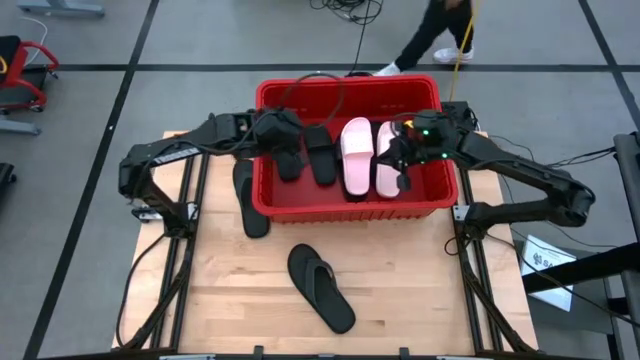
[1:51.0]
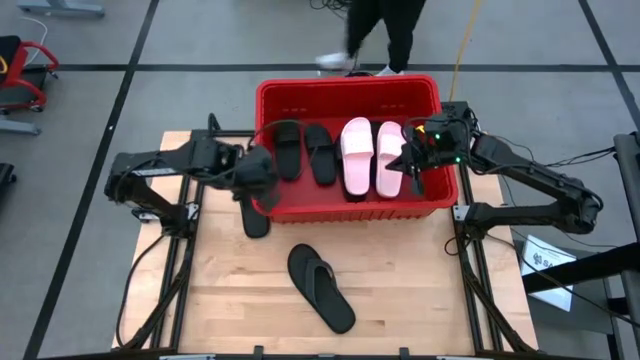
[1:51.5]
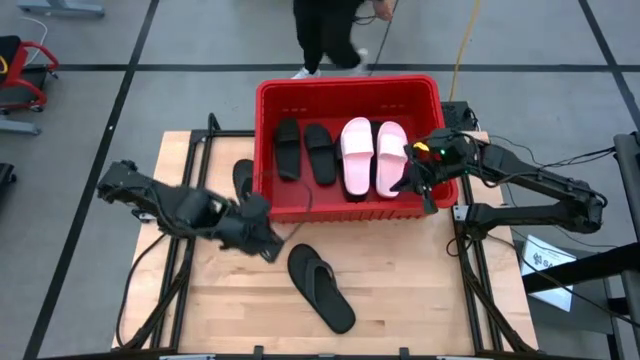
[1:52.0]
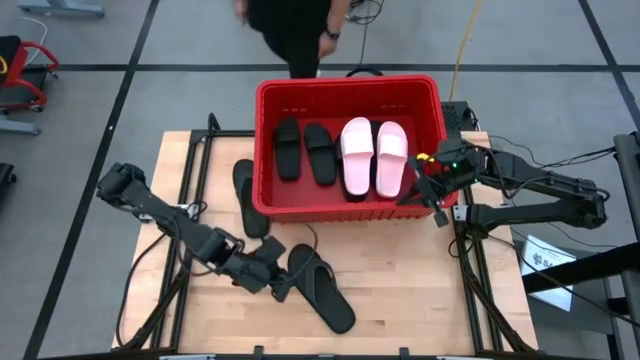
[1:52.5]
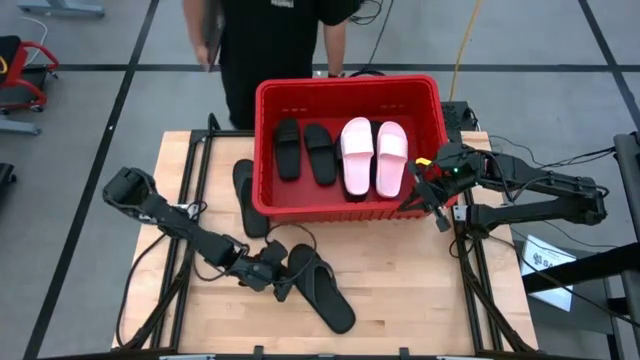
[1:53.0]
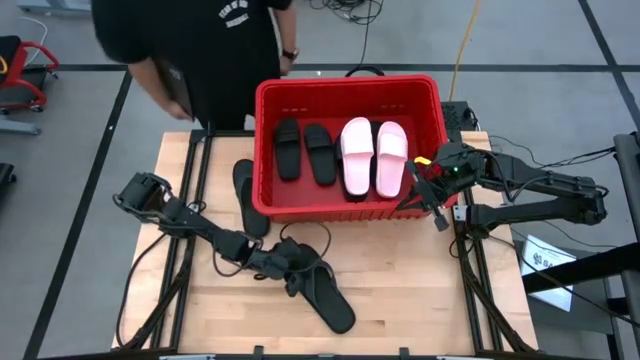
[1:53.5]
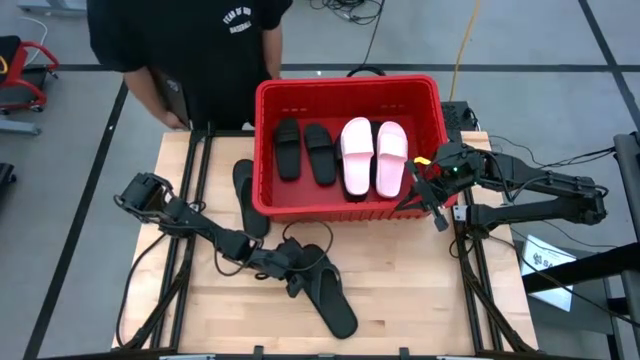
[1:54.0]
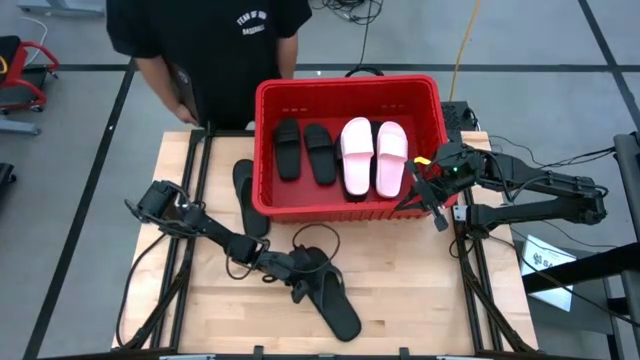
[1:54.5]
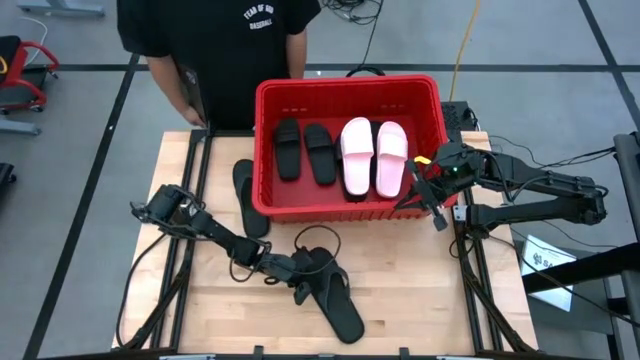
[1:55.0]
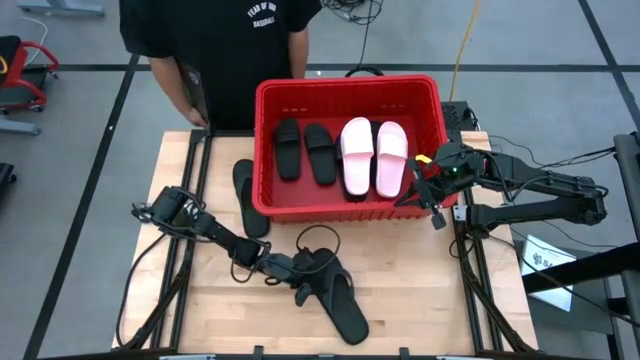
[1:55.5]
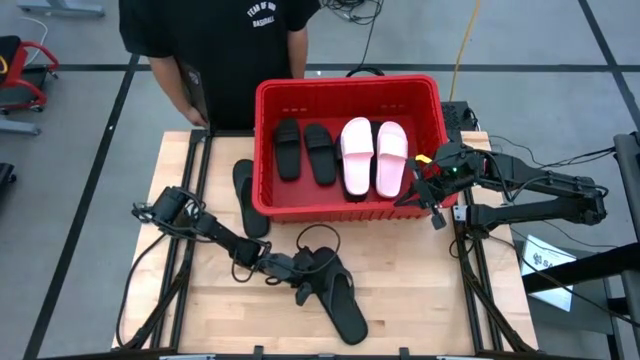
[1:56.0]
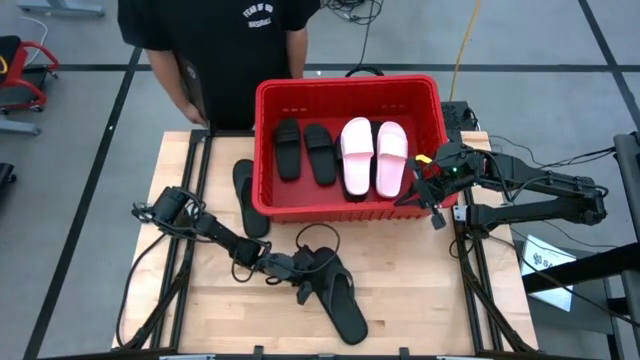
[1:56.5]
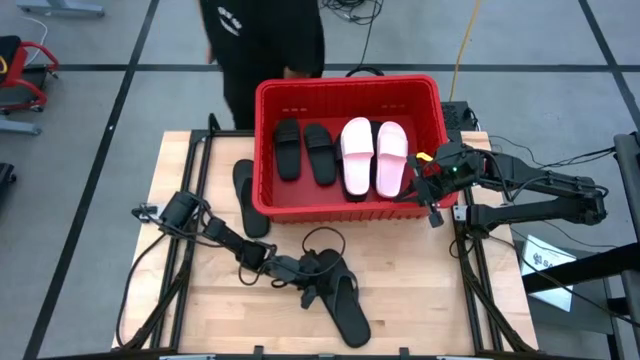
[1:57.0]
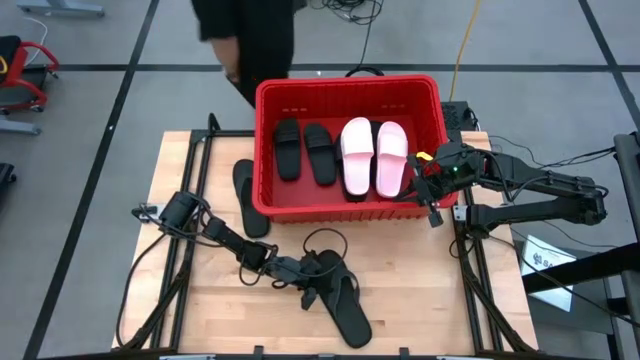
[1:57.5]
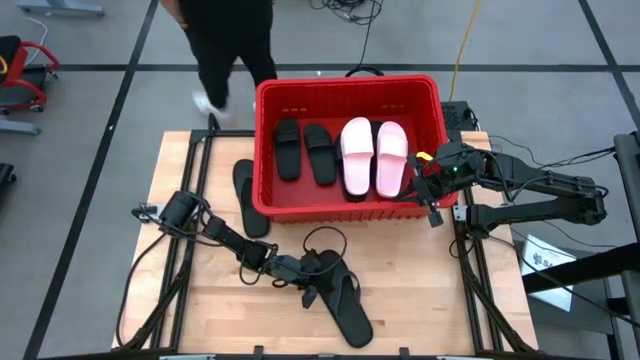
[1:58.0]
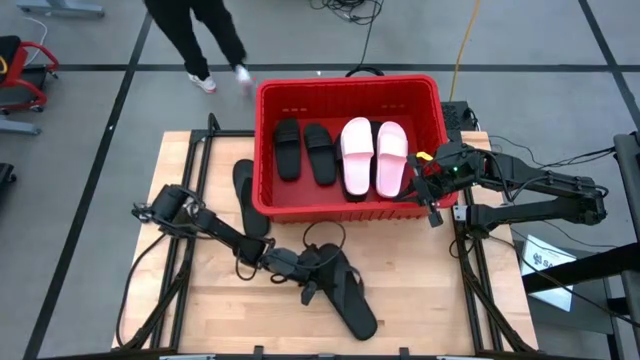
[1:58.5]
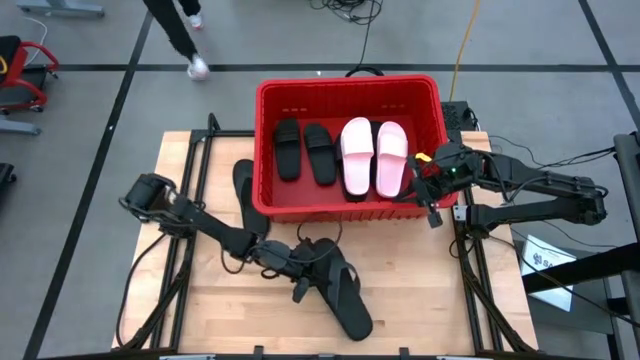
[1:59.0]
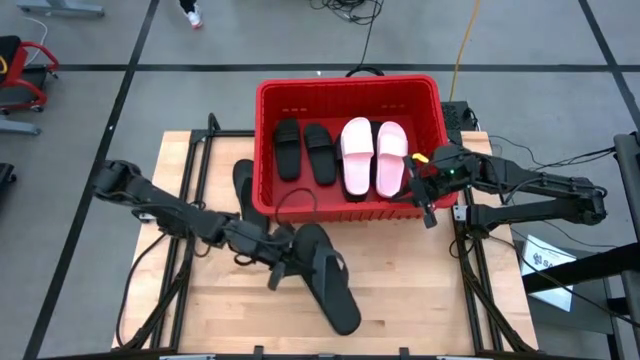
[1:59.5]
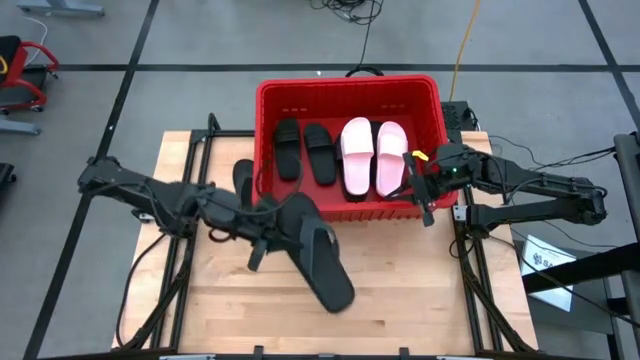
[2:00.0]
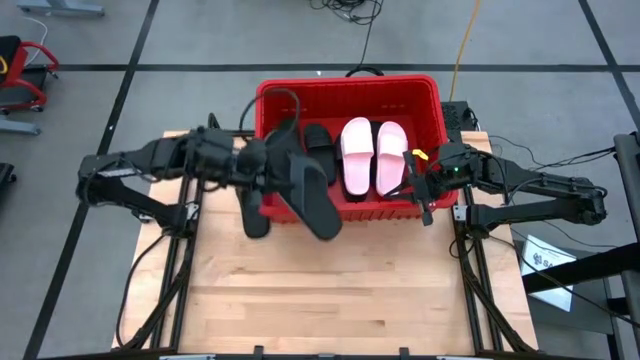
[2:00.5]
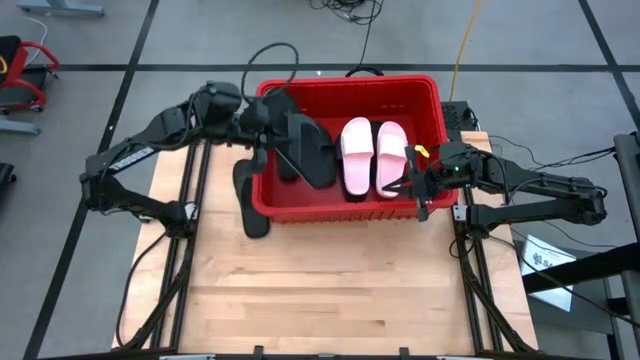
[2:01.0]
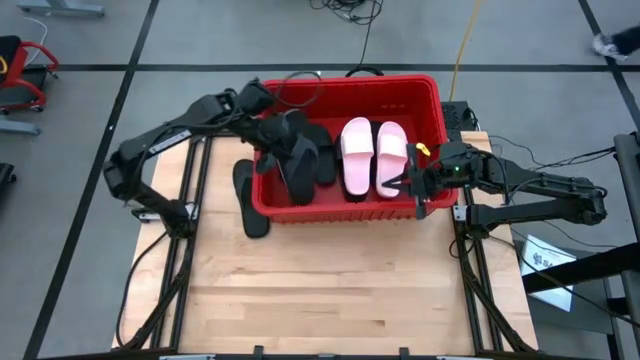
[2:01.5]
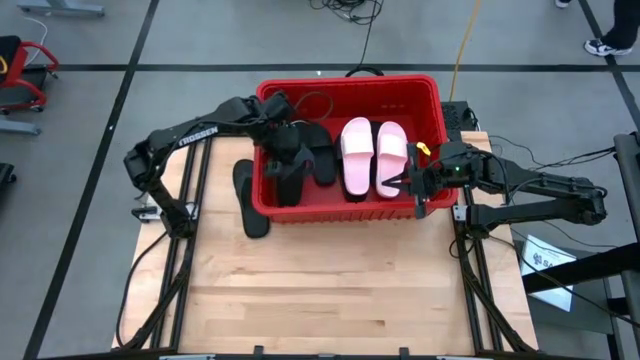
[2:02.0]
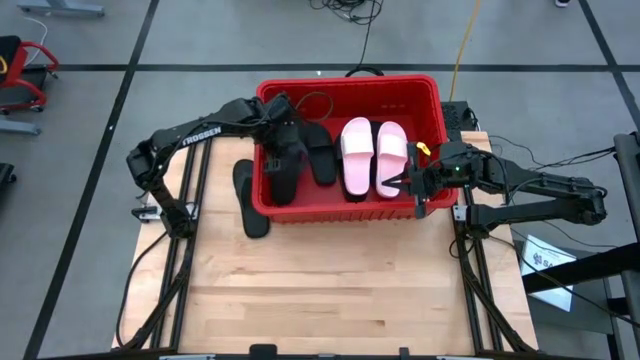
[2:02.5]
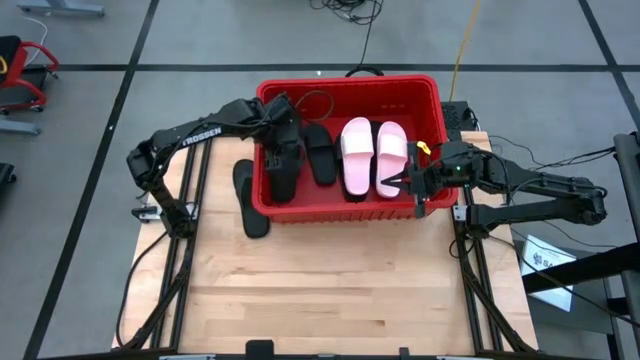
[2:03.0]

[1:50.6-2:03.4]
Task: Pick and place slides into bin
Stack the bottom black flip flop on top of the black slide in the red bin

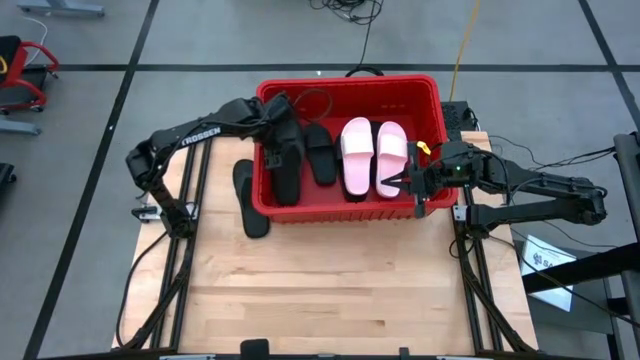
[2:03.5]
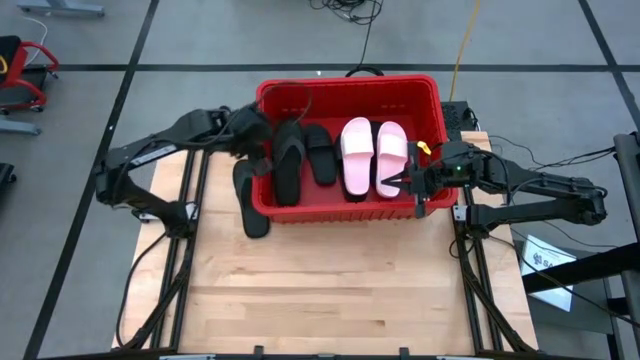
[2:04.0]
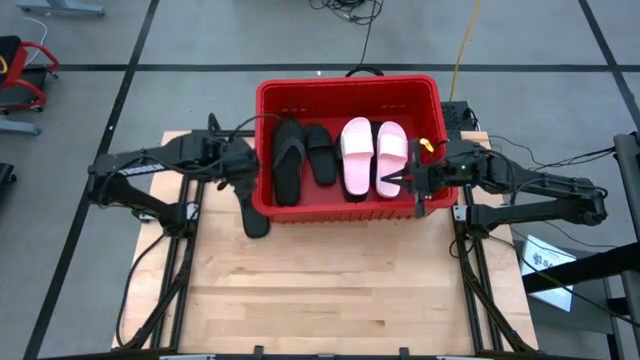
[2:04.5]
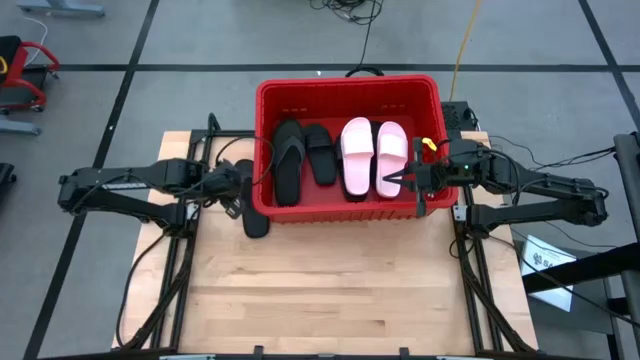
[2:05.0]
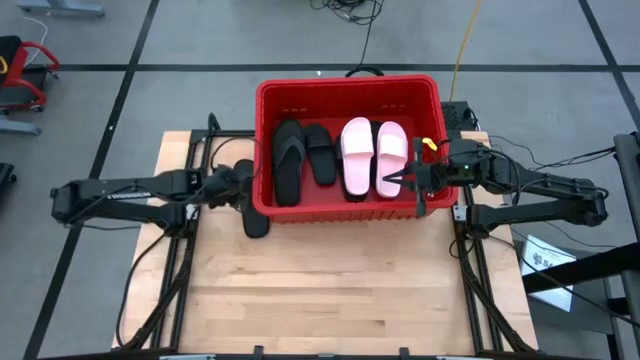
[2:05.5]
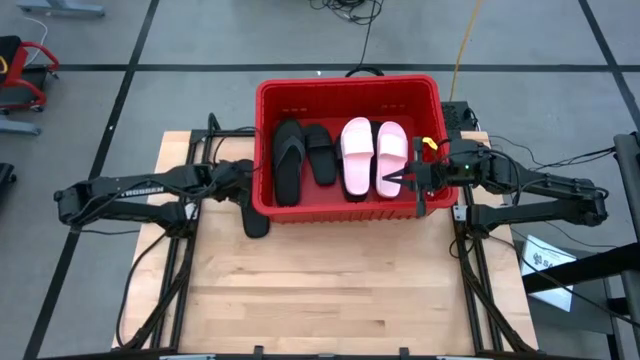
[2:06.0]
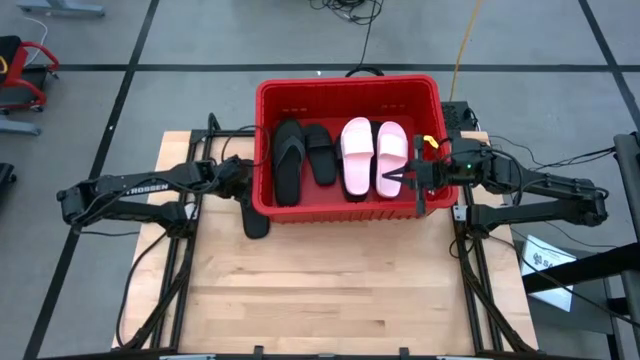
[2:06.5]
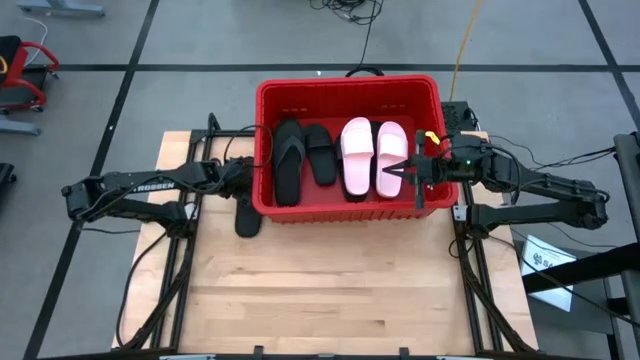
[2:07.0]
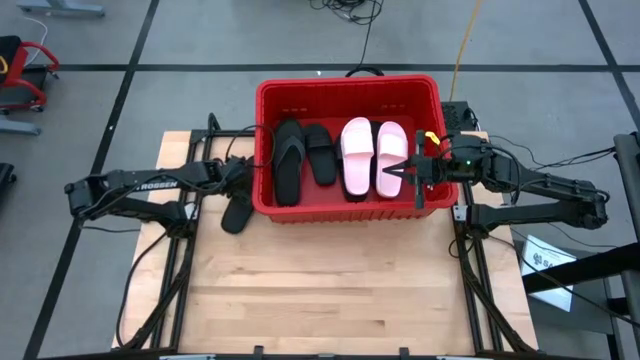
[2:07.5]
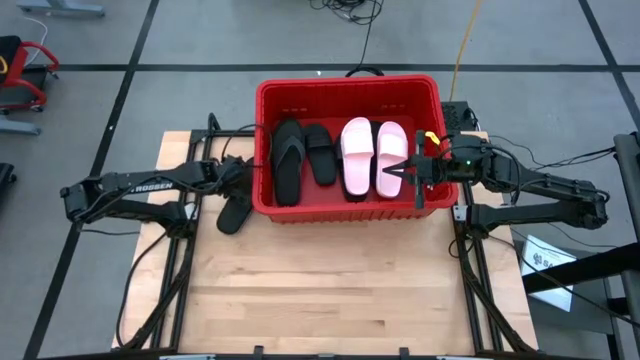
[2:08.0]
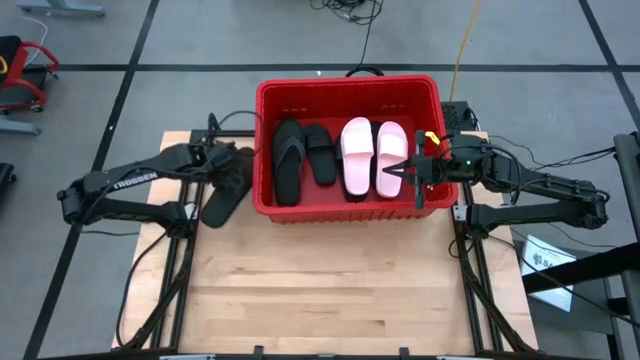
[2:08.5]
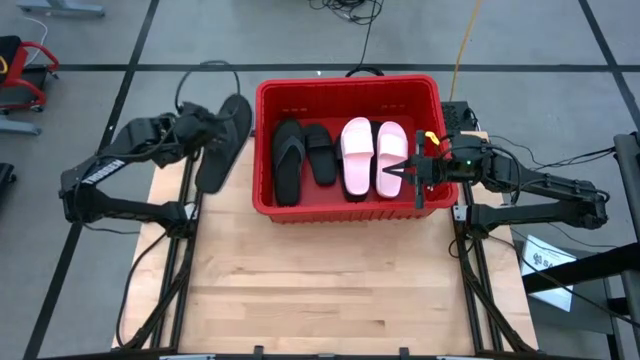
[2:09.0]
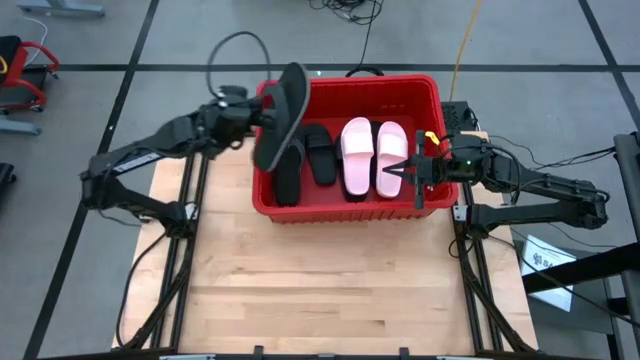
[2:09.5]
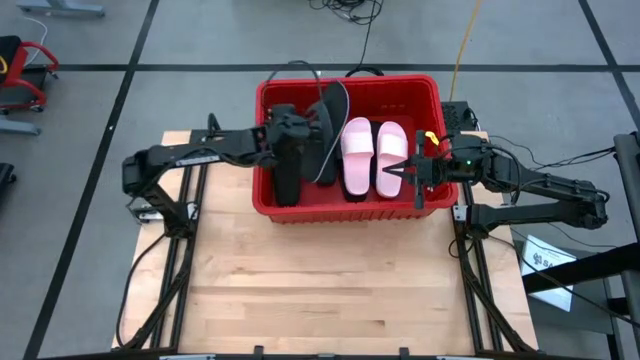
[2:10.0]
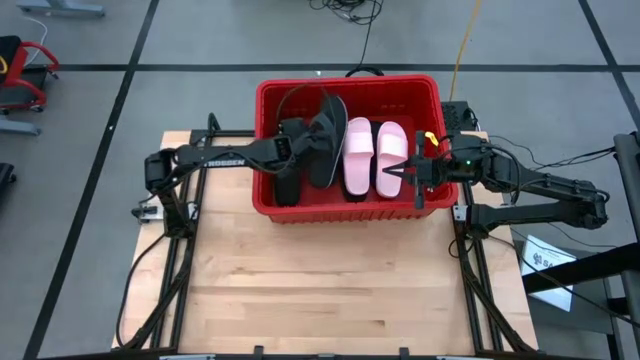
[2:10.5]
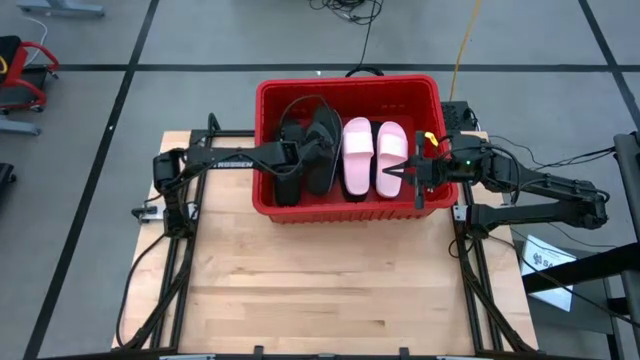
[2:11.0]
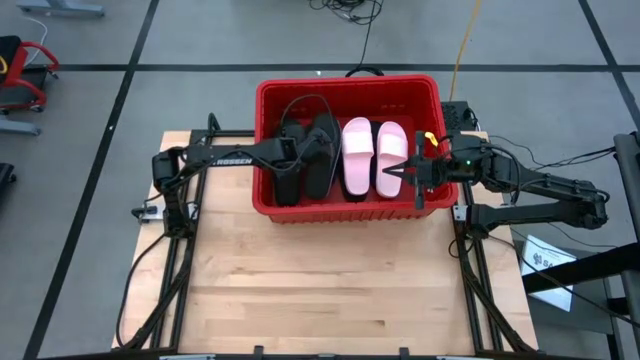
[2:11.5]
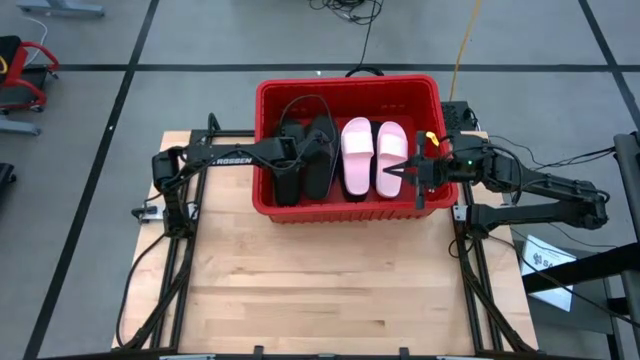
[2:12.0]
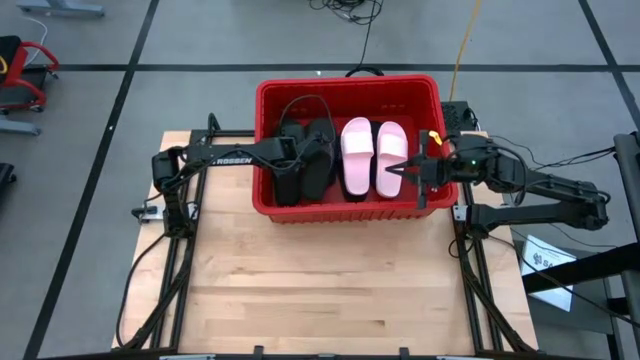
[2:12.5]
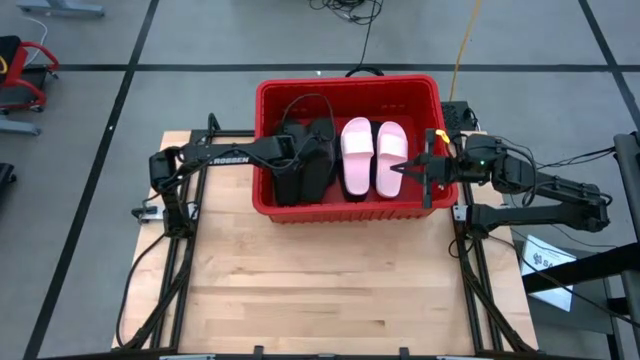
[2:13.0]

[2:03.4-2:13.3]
Stack the black flip flop on top of the black slide in the red bin
